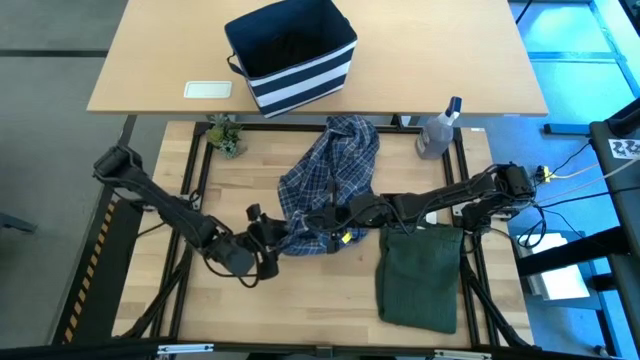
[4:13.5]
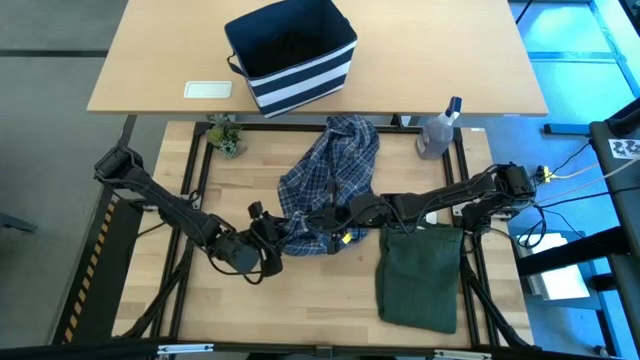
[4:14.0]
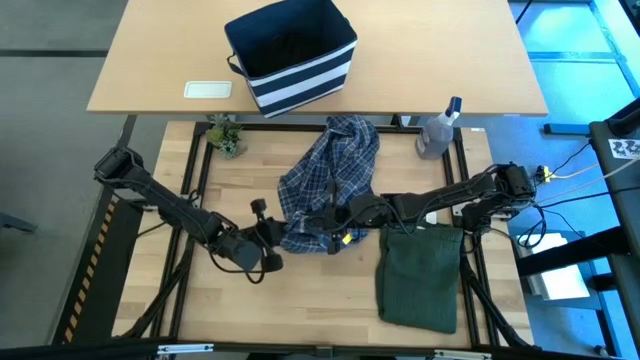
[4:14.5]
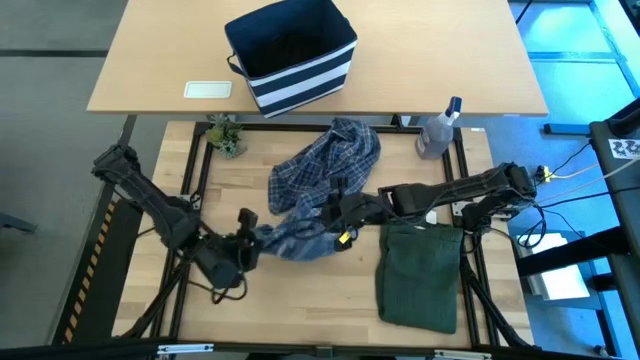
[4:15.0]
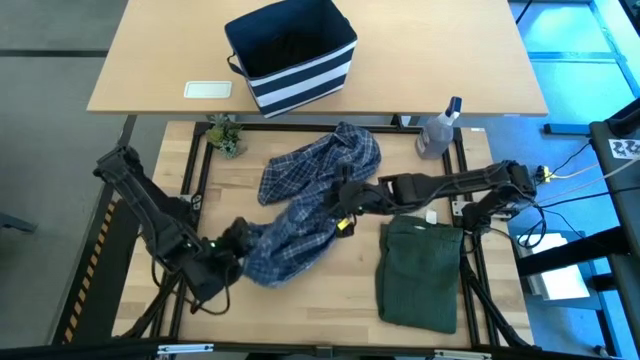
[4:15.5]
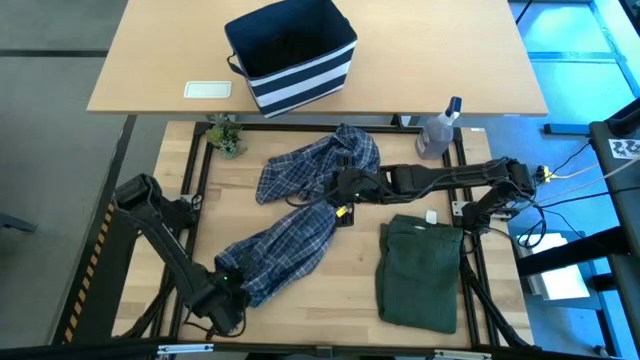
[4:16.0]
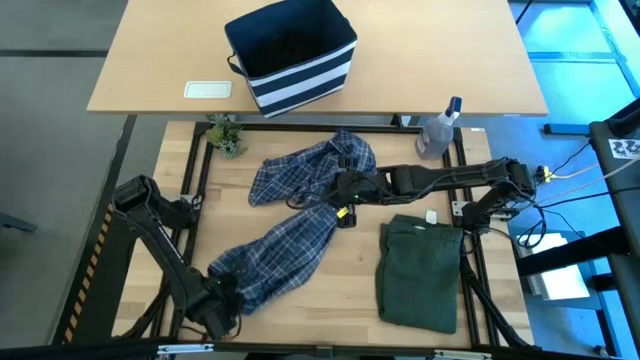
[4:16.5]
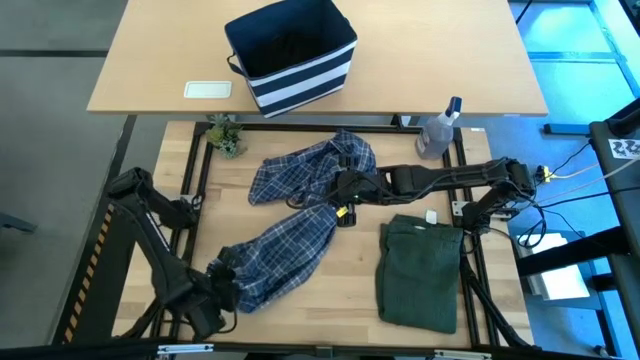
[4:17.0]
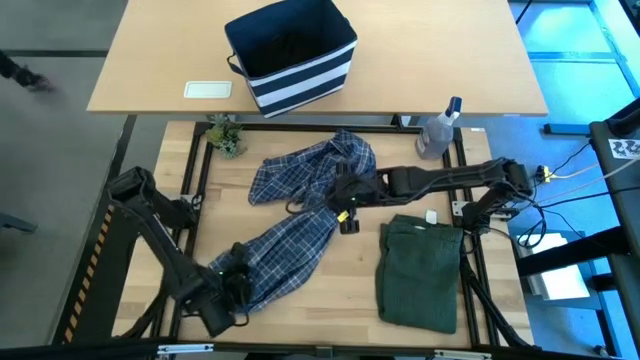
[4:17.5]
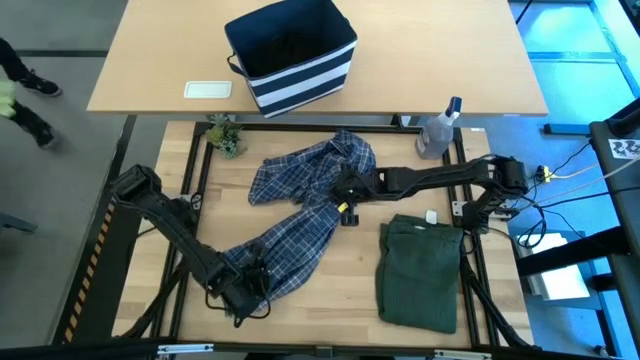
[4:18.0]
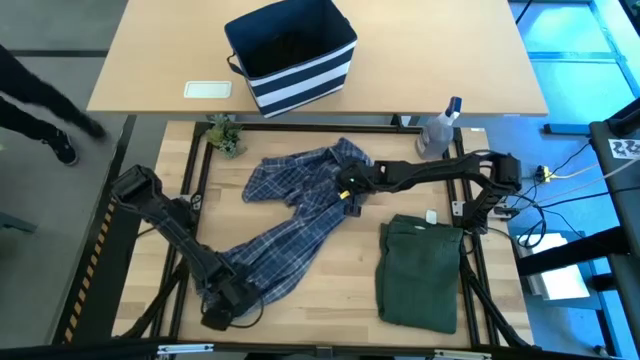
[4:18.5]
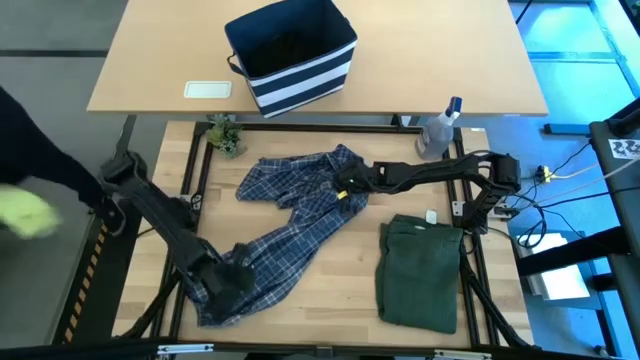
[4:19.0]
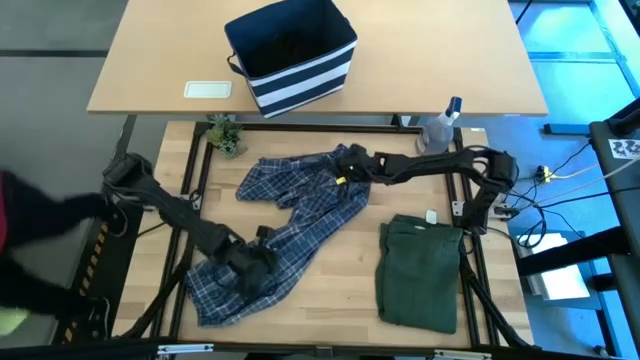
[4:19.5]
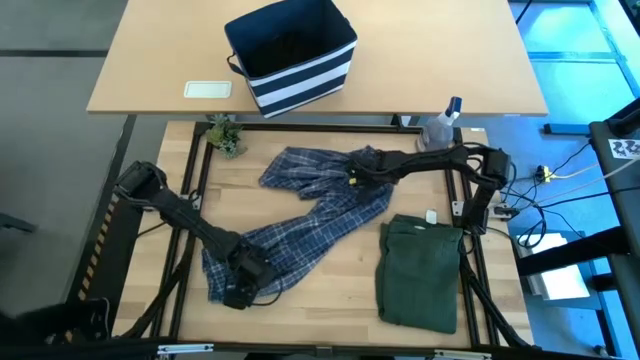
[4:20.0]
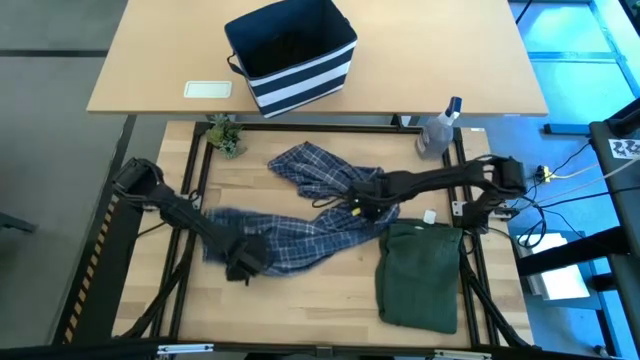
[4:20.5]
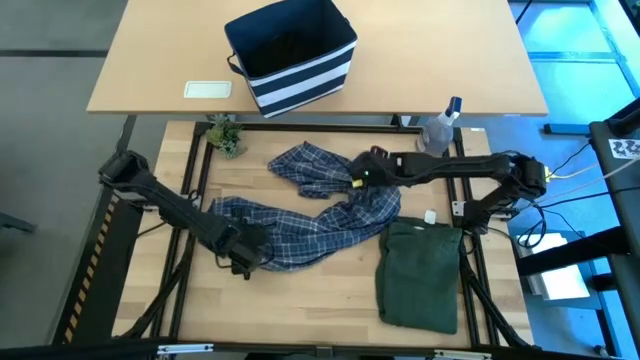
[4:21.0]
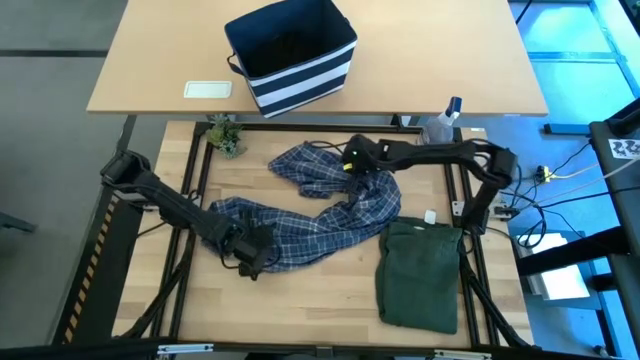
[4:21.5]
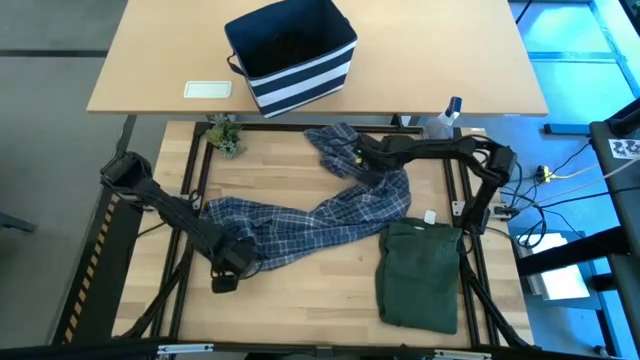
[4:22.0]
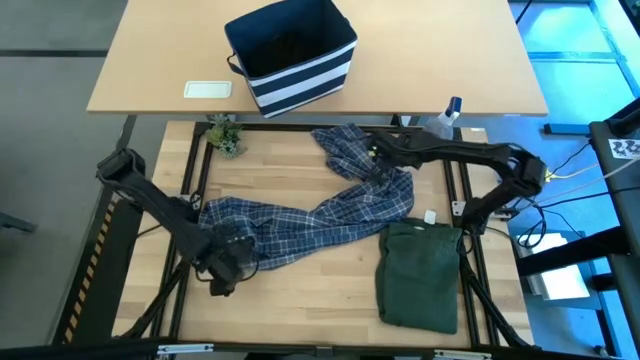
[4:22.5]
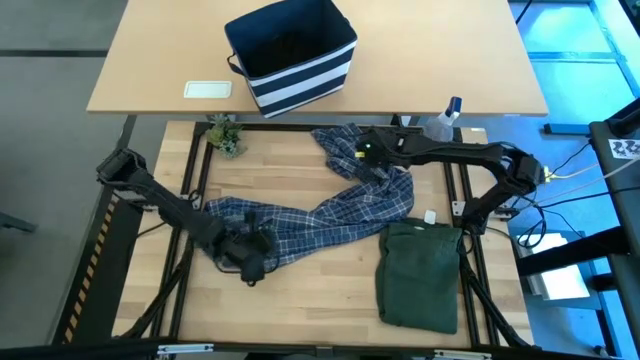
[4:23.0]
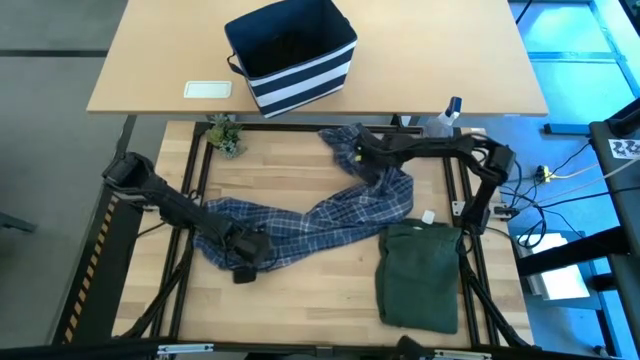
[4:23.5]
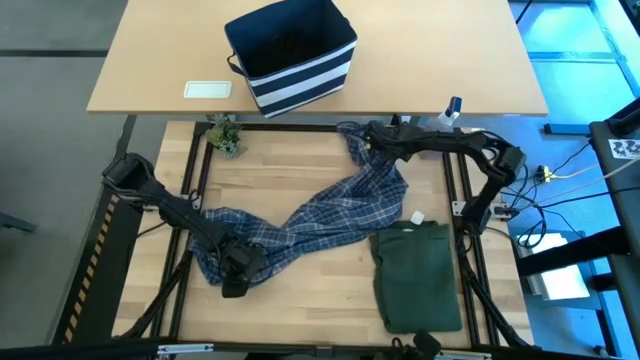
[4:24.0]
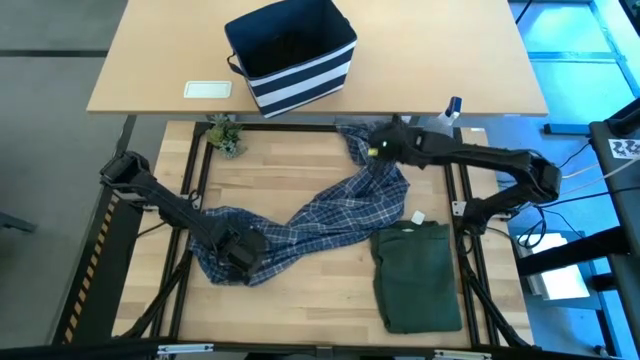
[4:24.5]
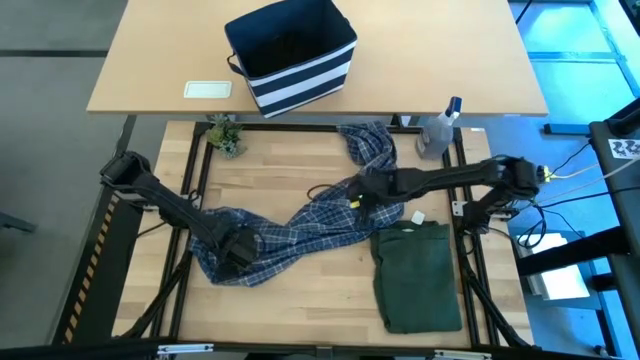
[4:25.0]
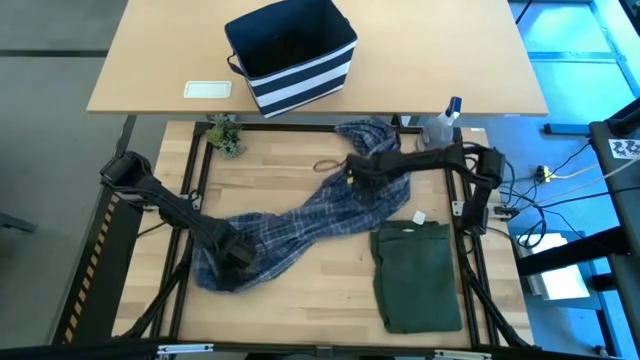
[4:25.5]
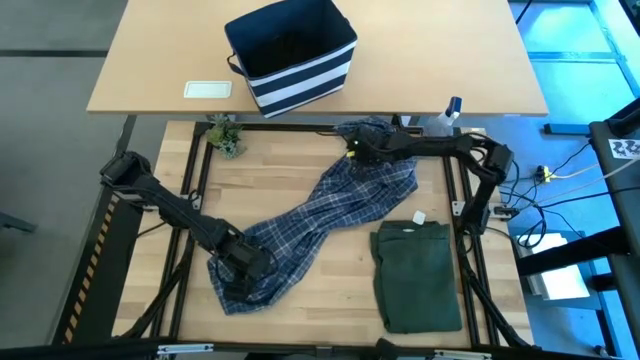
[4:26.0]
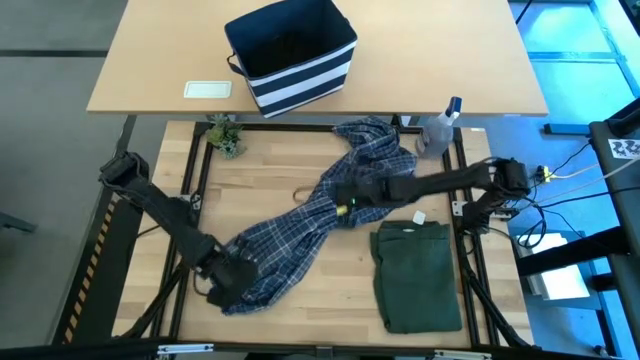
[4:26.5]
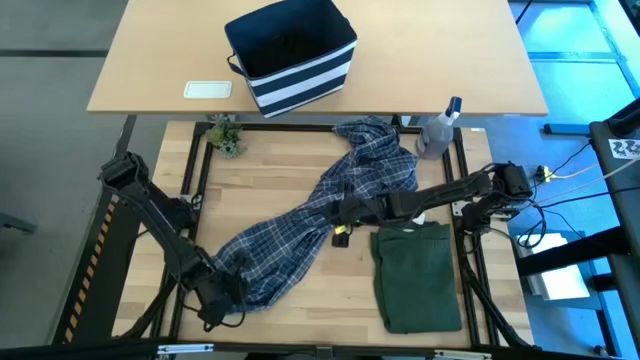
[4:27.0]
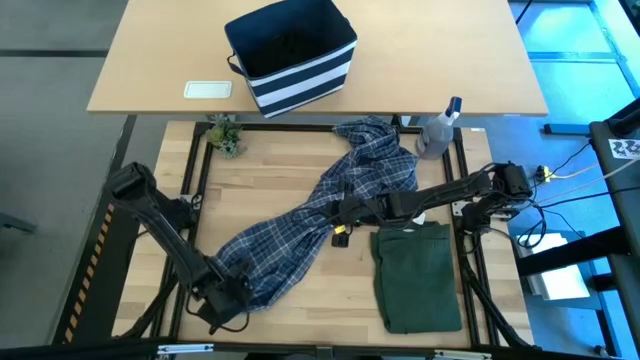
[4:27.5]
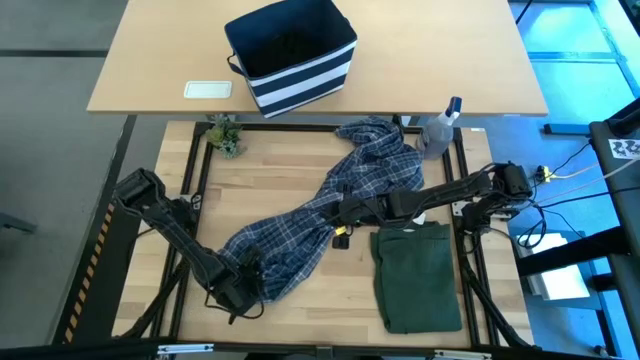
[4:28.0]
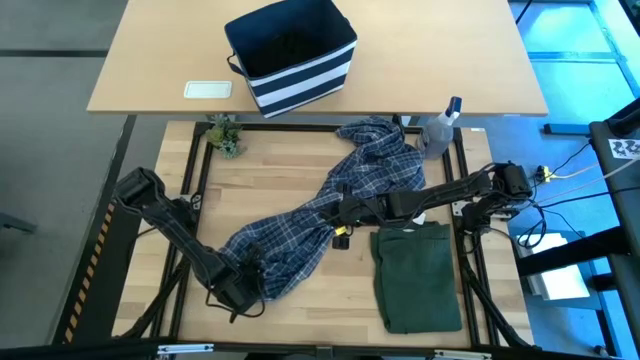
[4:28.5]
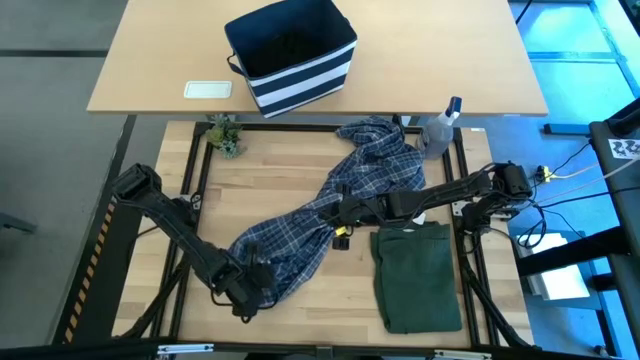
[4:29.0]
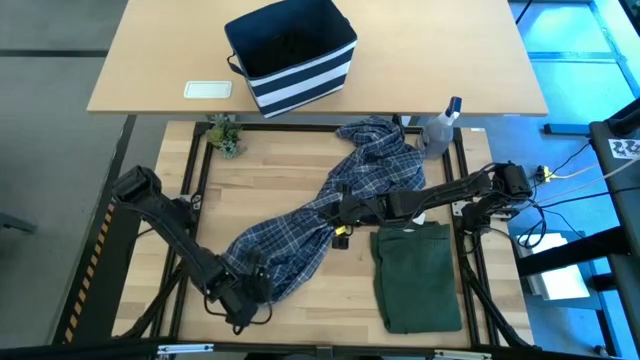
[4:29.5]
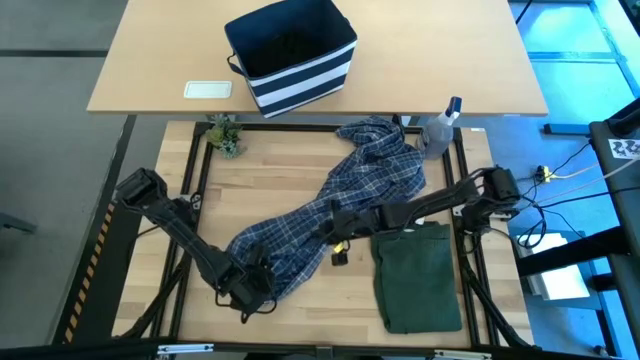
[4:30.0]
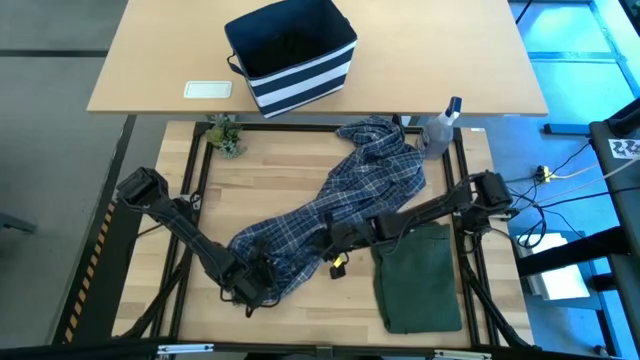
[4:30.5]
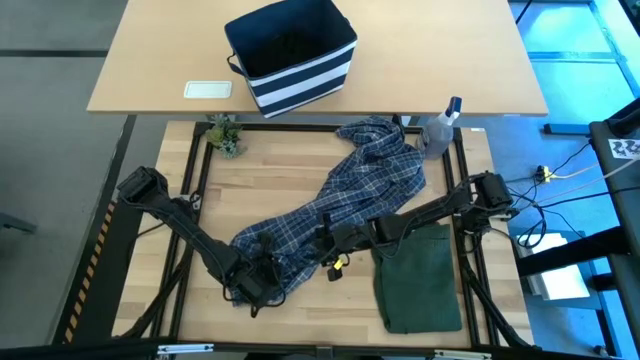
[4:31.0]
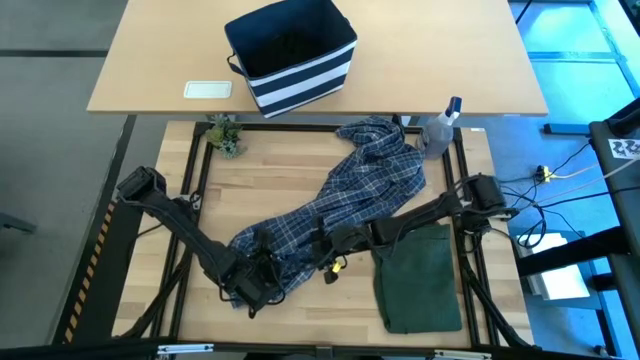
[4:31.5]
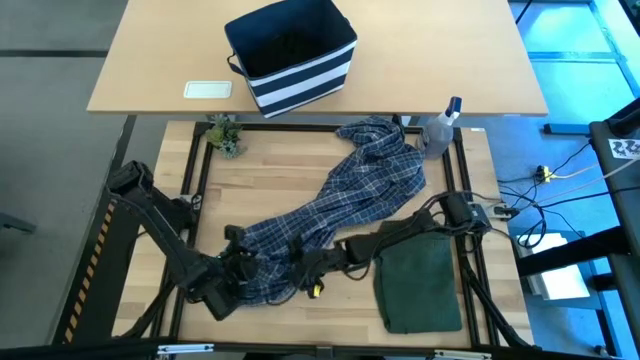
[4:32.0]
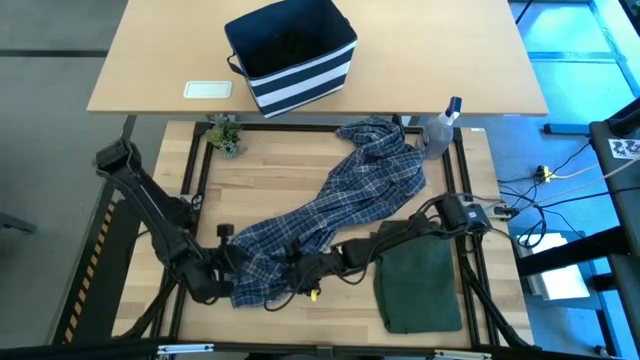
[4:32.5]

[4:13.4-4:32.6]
Task: Fold Laundry from Bin
Fold the blue checkered pants
